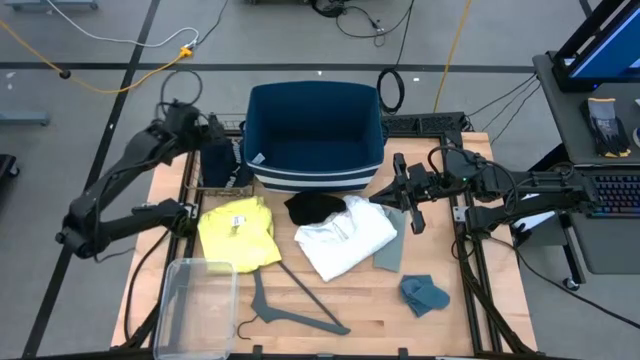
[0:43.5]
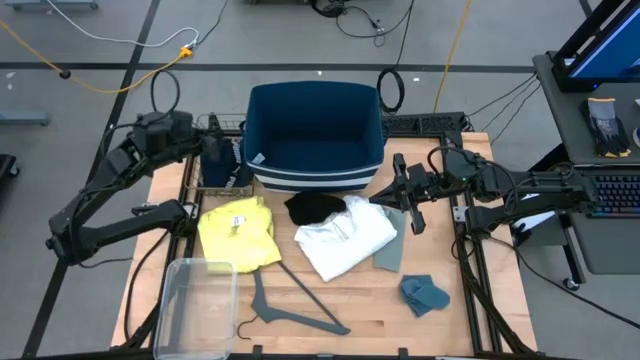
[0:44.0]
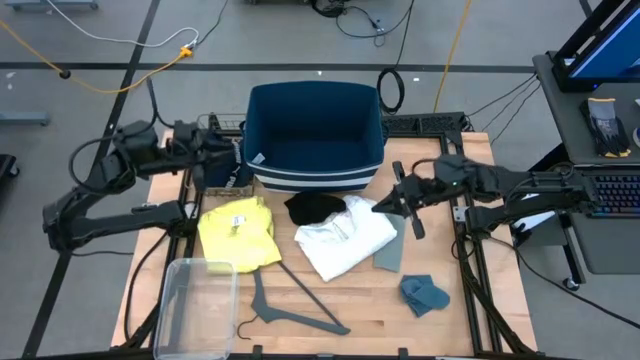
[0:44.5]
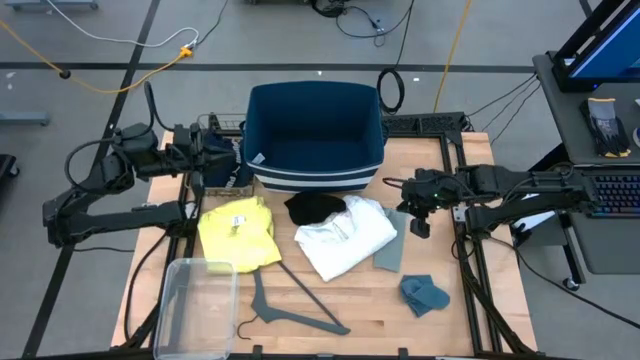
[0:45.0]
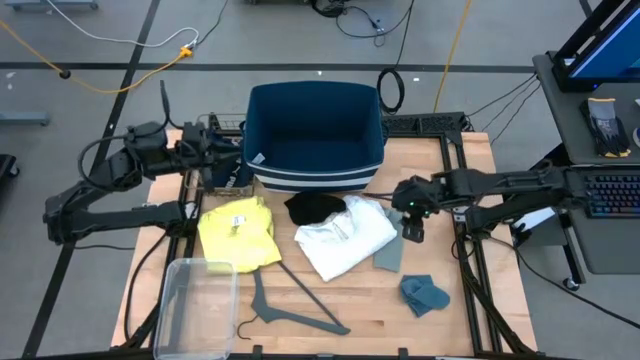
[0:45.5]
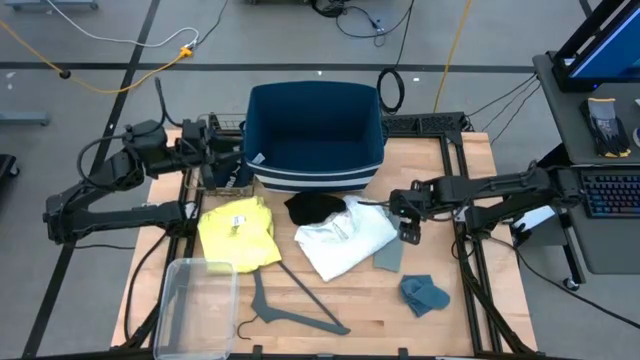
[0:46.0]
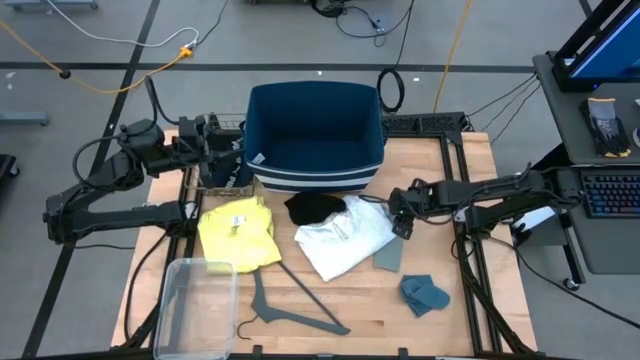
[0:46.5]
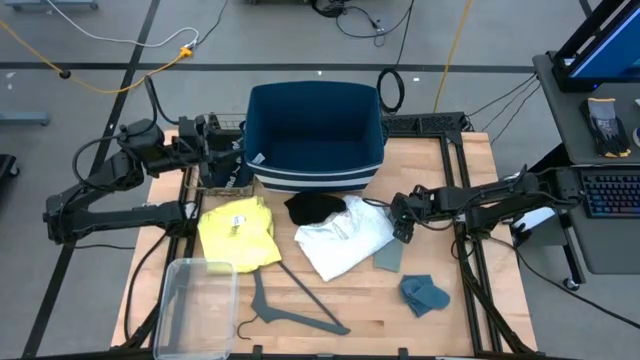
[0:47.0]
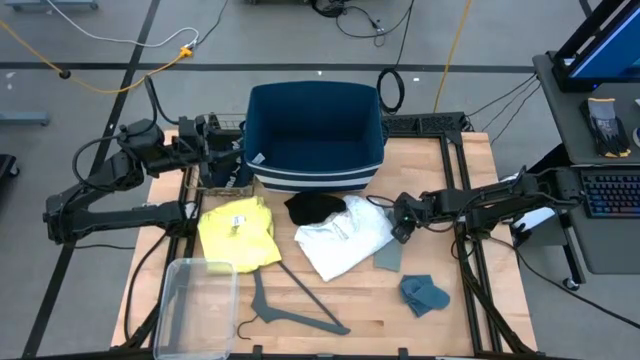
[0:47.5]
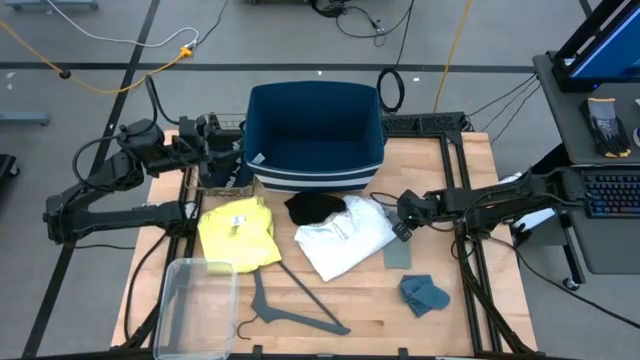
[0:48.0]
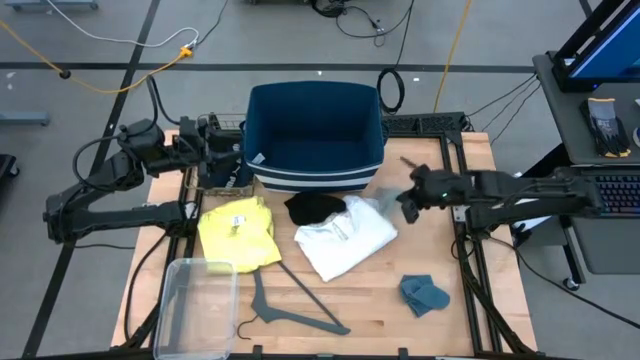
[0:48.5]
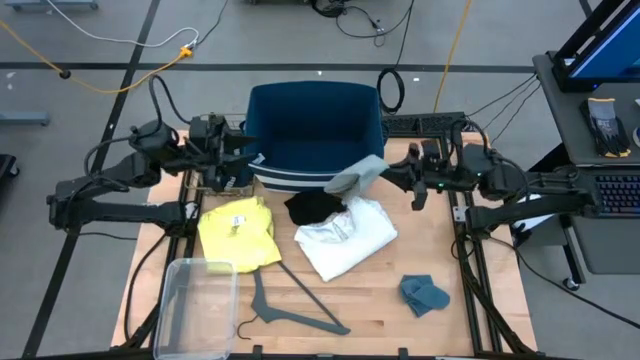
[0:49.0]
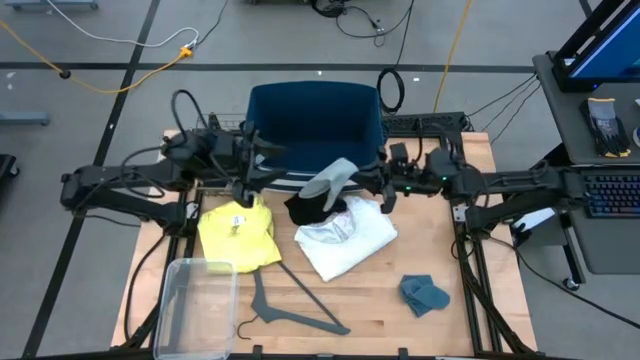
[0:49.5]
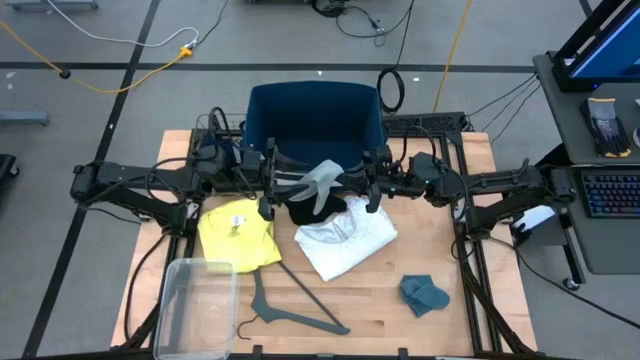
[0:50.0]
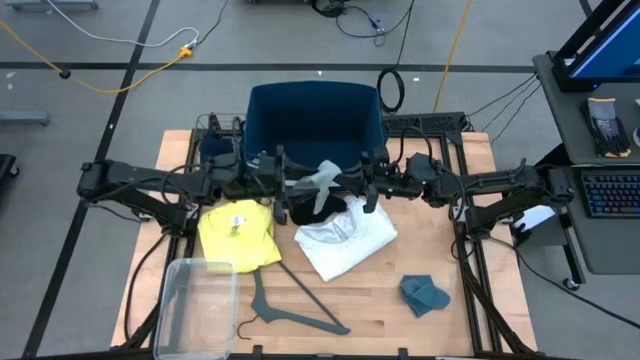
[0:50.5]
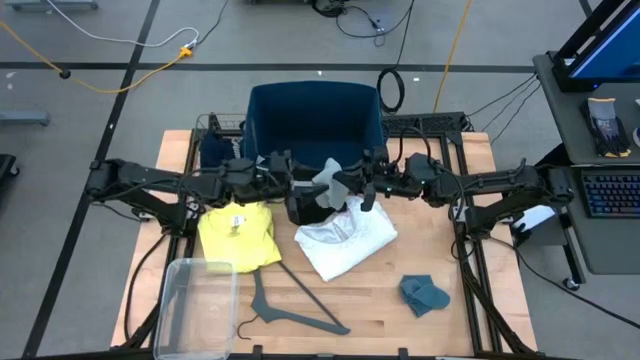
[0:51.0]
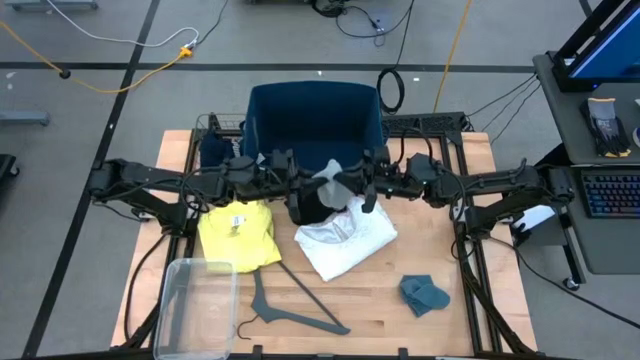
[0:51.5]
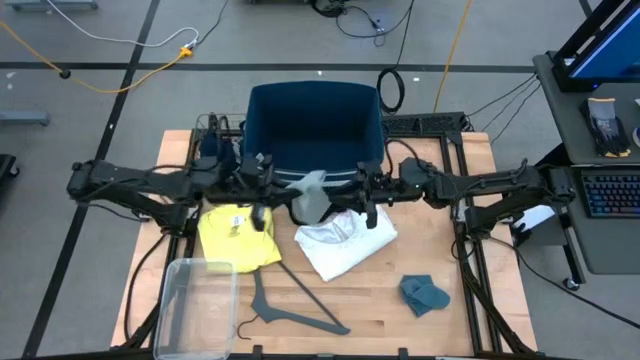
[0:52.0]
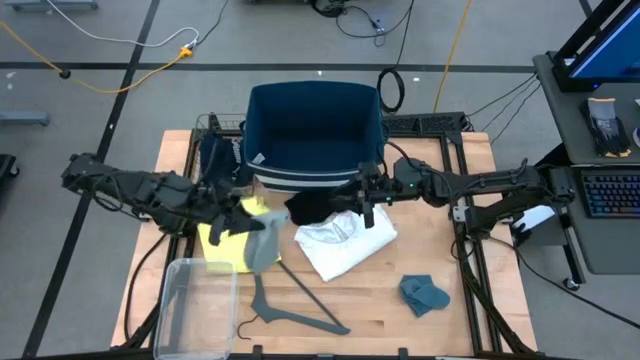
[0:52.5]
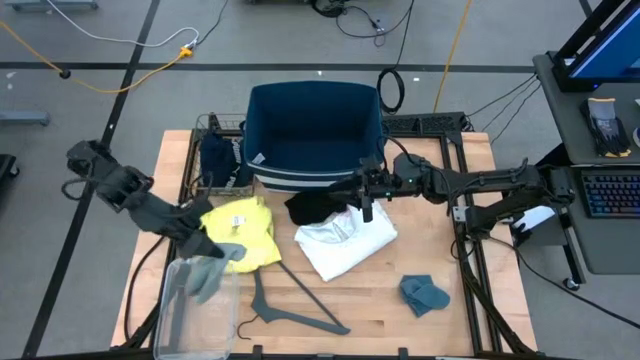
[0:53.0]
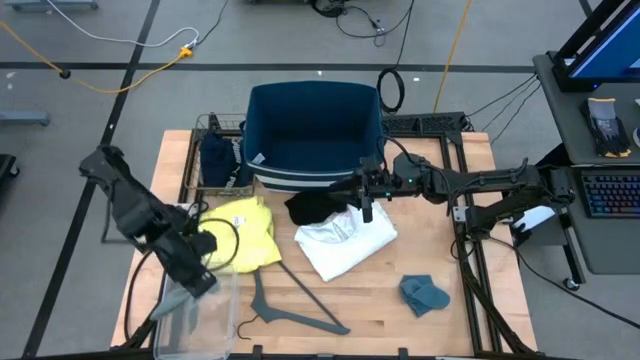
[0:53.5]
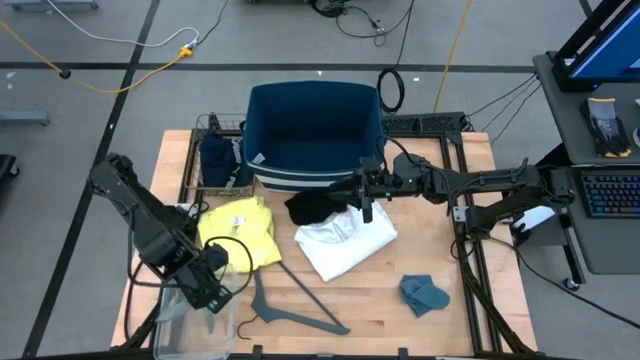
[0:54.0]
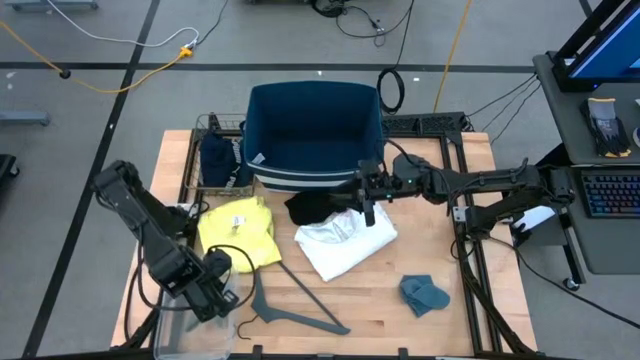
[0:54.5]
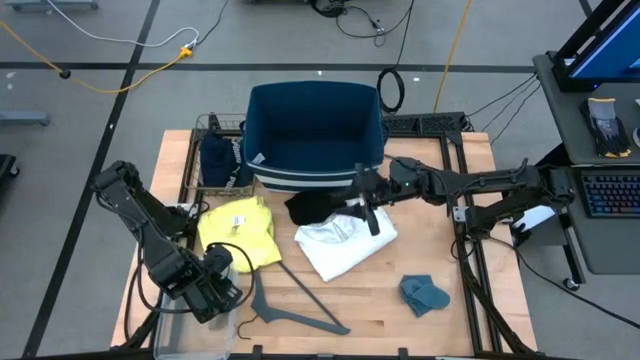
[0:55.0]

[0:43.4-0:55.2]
Task: Pick & Place Cloths
Put the gray sock into the transparent bin

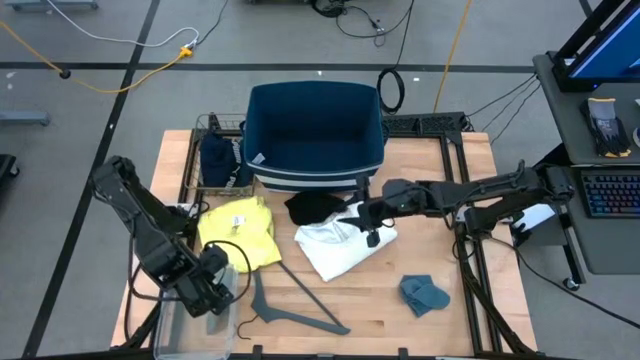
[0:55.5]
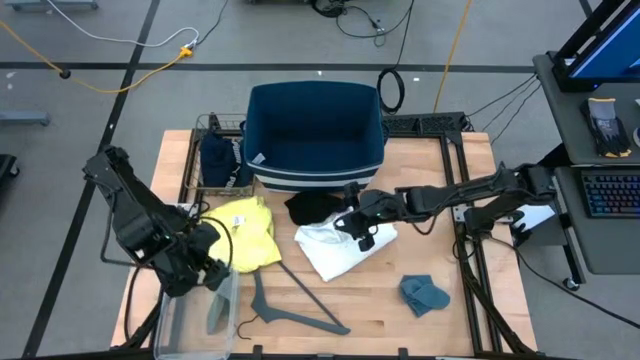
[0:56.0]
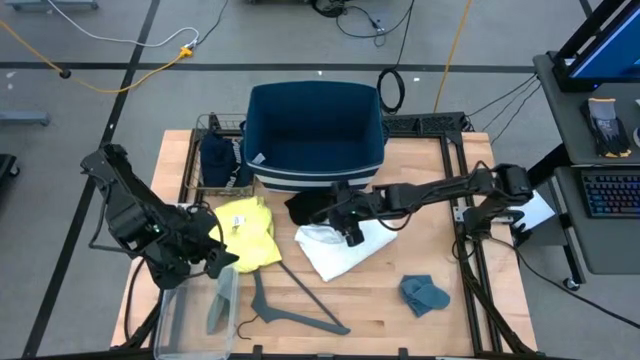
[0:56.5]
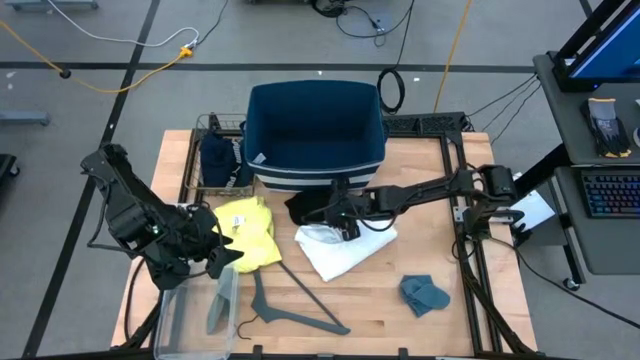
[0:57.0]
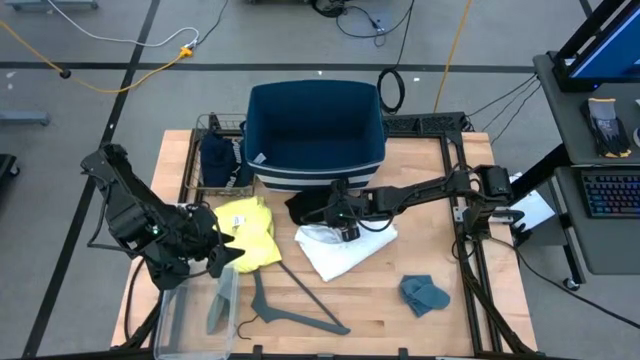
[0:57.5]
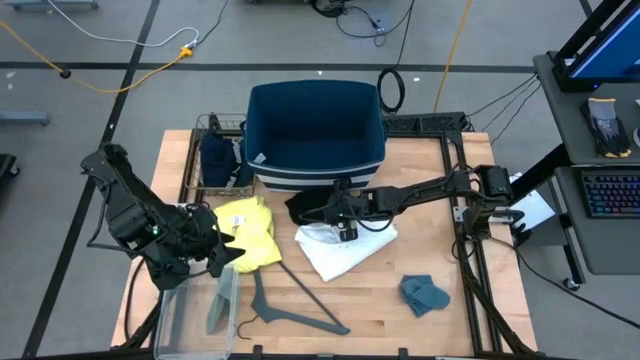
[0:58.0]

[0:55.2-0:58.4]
Put the black sock into the transparent bin

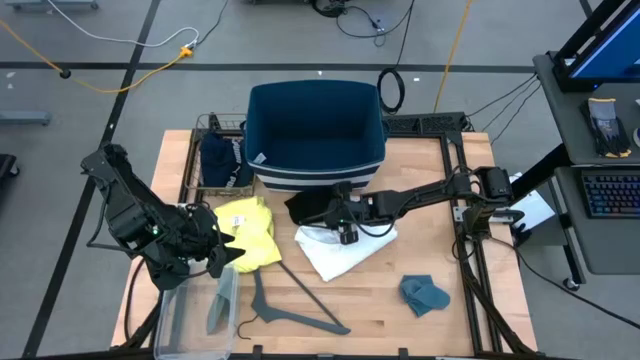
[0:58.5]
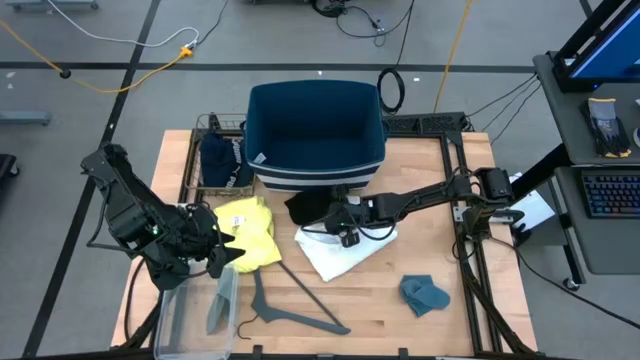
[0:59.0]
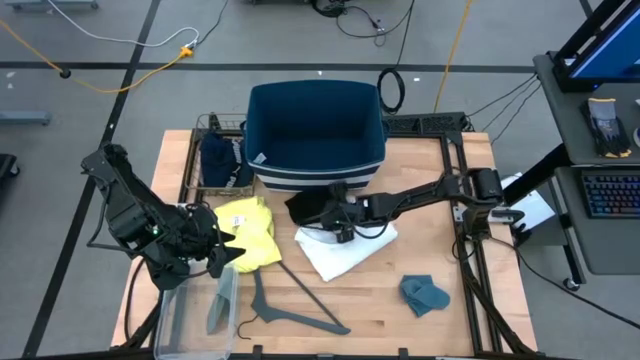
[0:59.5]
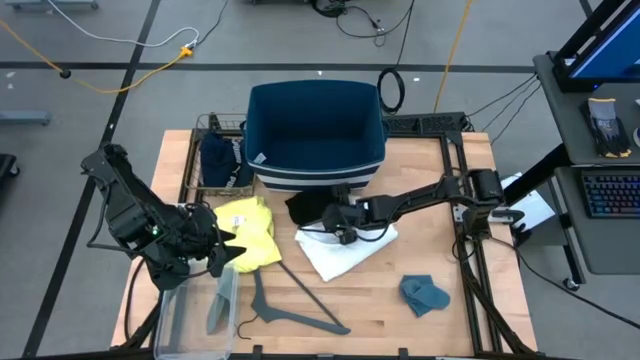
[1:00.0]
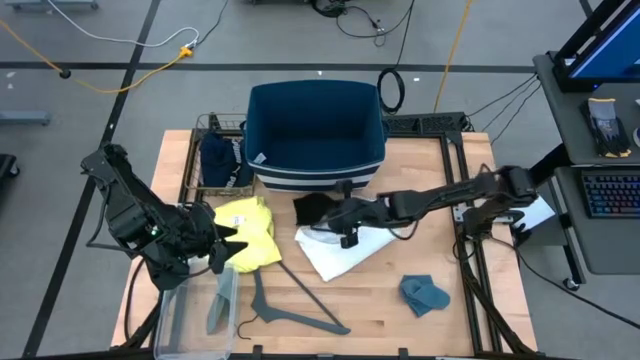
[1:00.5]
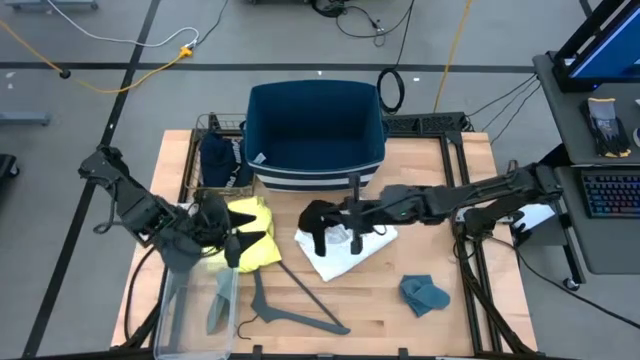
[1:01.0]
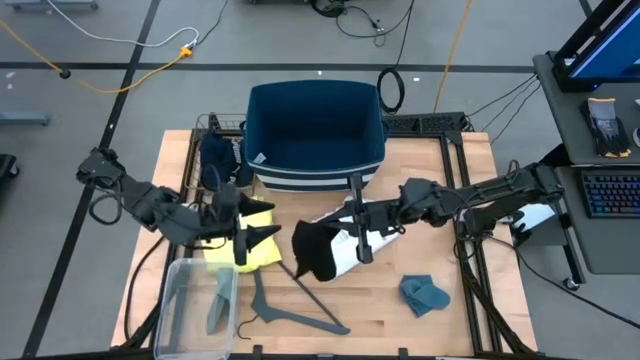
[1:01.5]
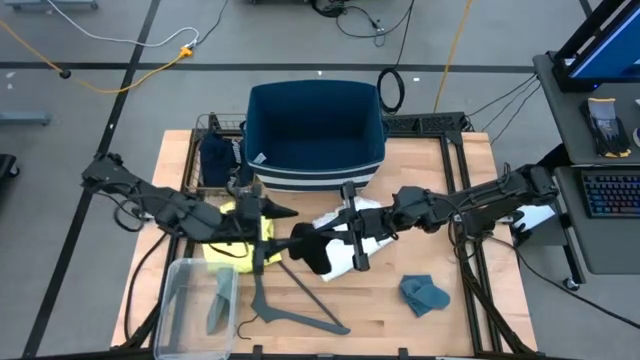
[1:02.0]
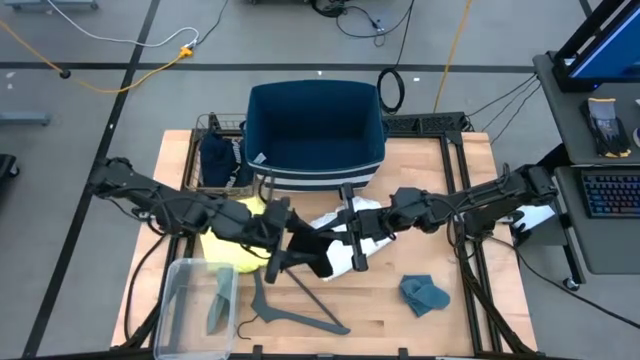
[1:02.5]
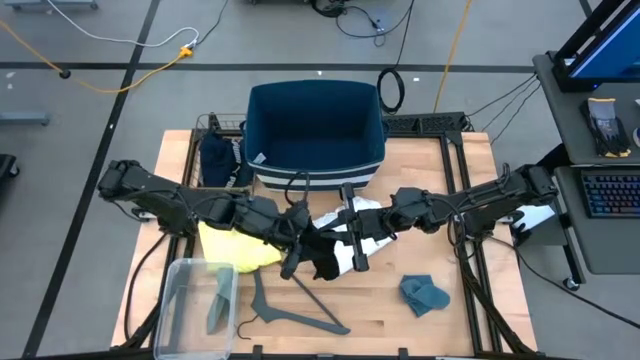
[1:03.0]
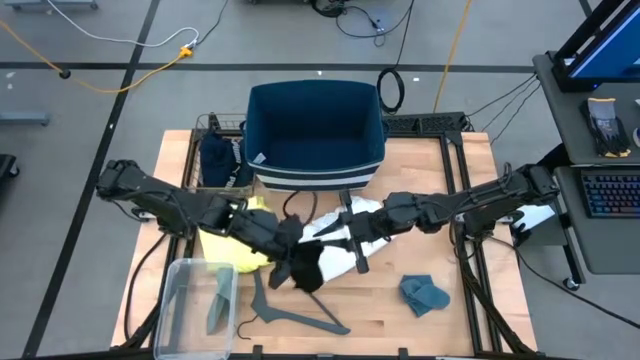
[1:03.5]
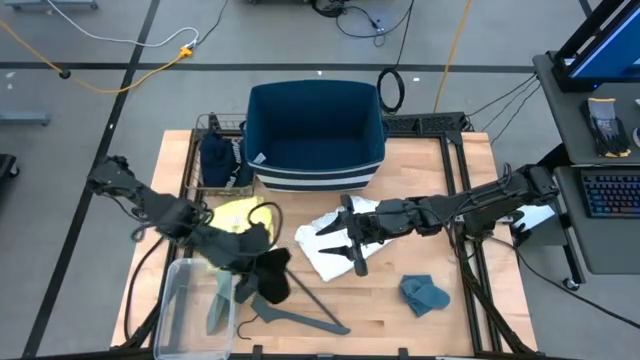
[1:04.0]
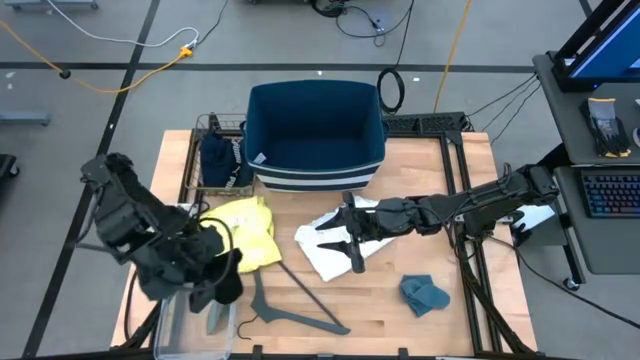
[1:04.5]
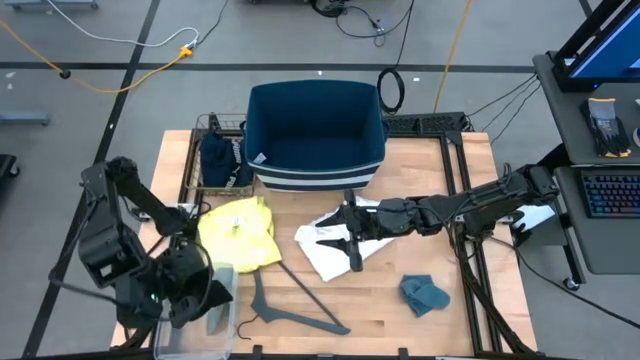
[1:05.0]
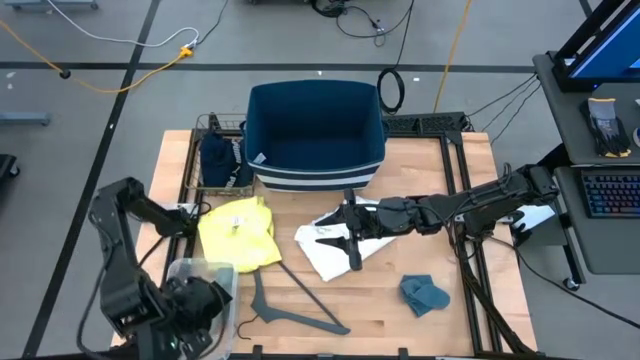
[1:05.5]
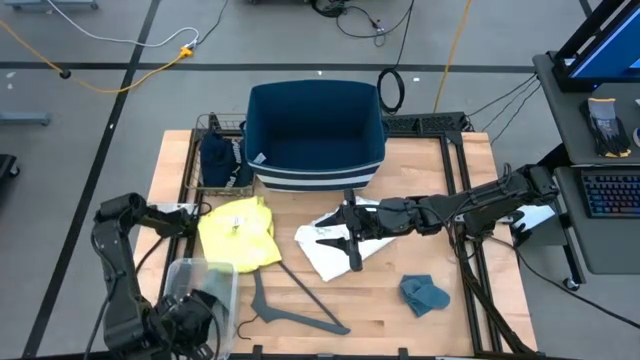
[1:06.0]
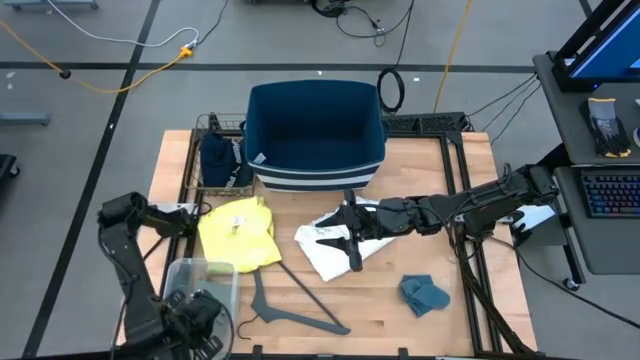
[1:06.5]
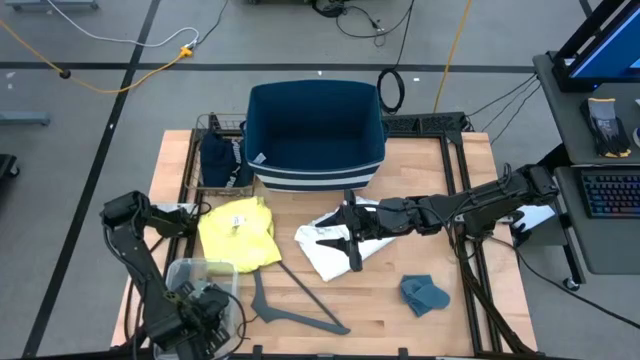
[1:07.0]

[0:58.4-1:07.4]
Put the black sock into the transparent bin
